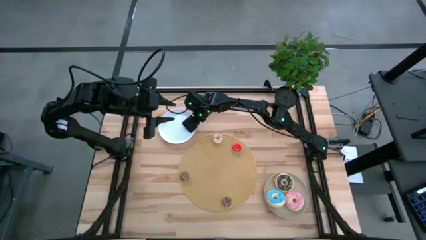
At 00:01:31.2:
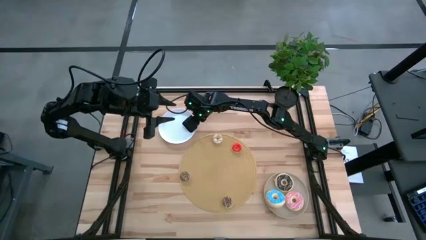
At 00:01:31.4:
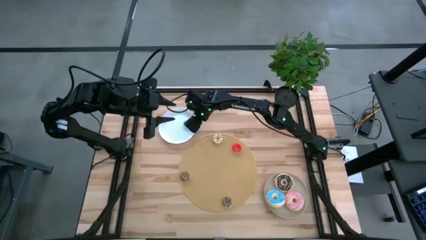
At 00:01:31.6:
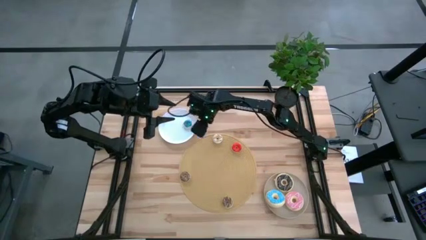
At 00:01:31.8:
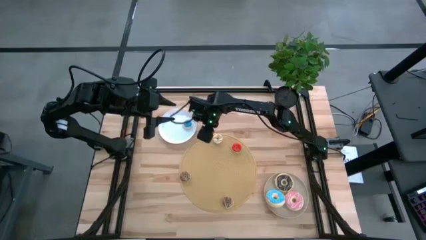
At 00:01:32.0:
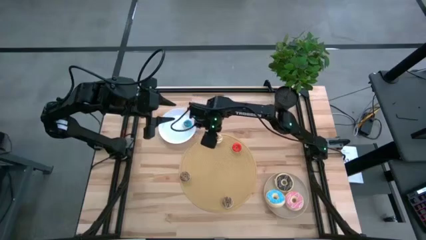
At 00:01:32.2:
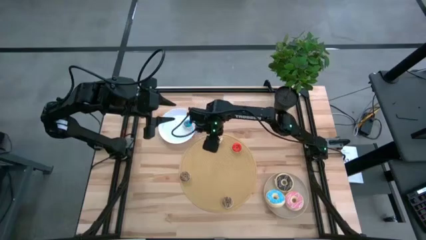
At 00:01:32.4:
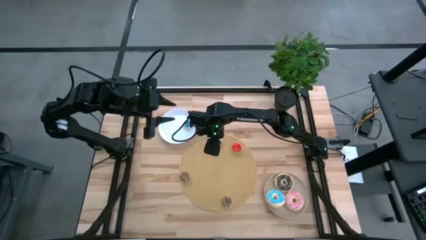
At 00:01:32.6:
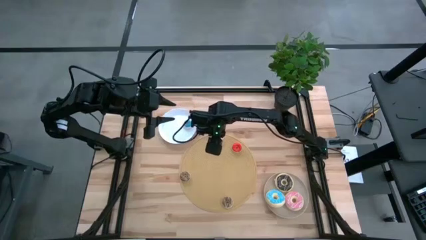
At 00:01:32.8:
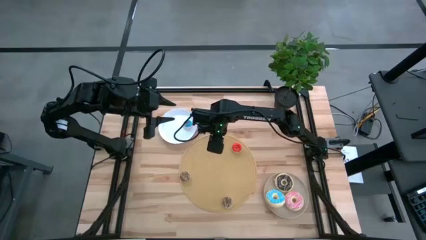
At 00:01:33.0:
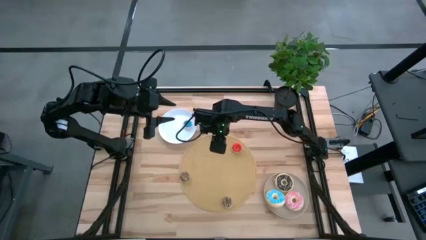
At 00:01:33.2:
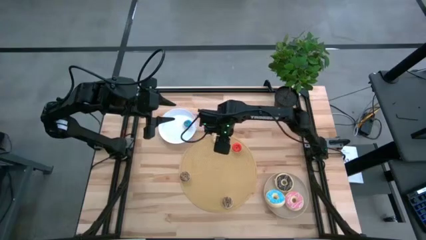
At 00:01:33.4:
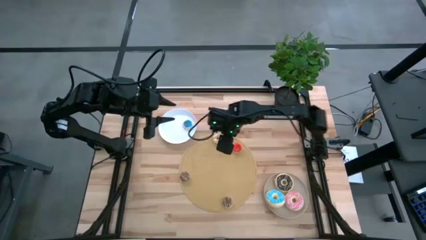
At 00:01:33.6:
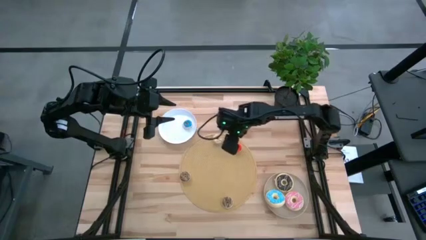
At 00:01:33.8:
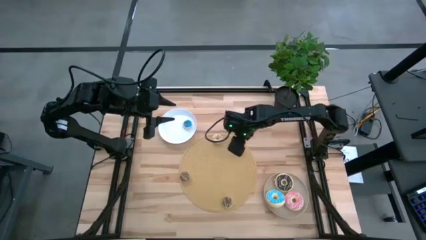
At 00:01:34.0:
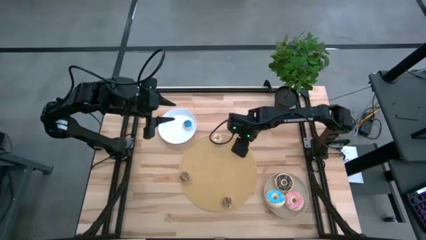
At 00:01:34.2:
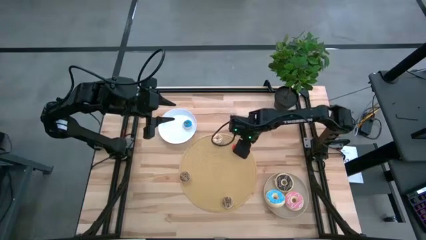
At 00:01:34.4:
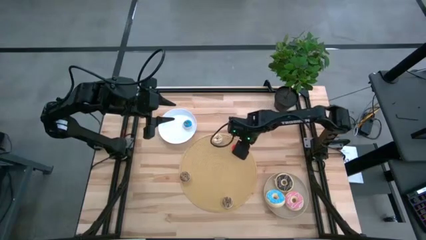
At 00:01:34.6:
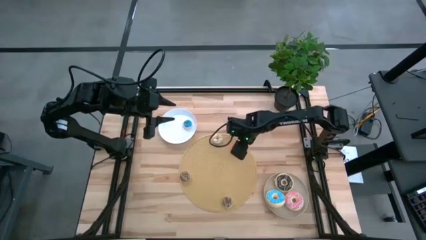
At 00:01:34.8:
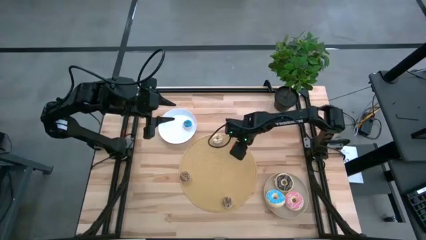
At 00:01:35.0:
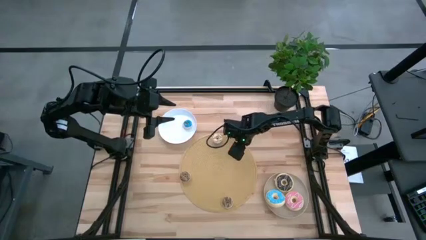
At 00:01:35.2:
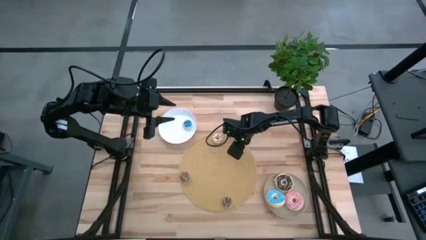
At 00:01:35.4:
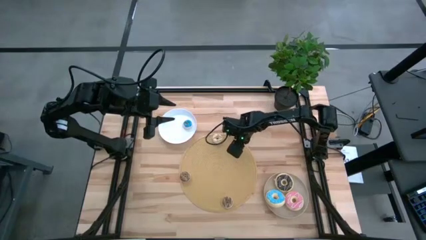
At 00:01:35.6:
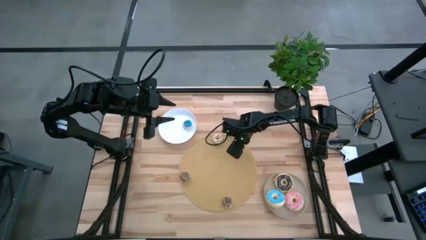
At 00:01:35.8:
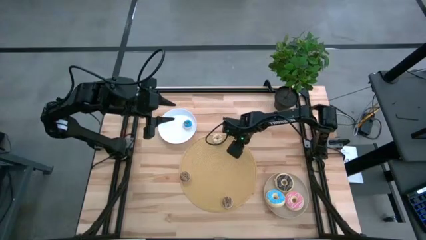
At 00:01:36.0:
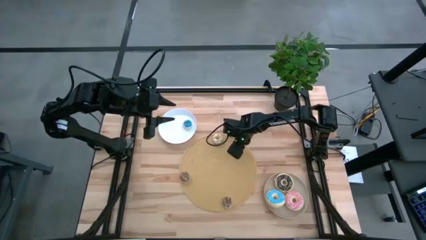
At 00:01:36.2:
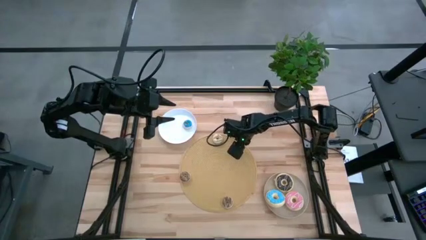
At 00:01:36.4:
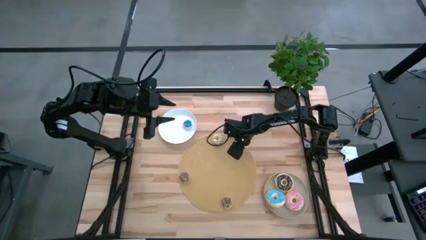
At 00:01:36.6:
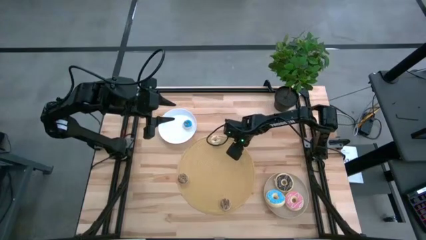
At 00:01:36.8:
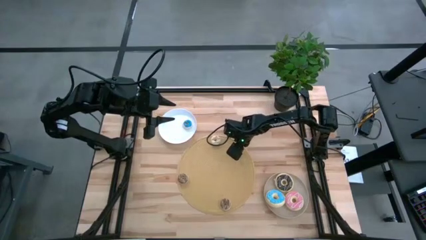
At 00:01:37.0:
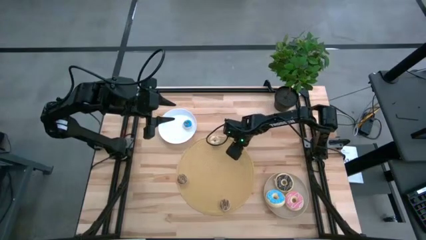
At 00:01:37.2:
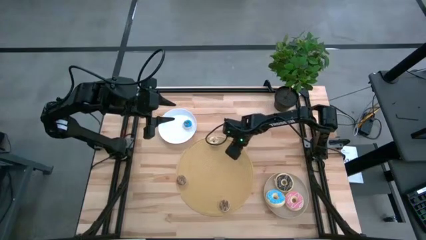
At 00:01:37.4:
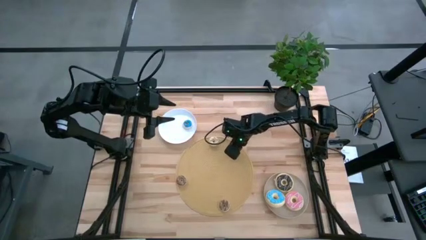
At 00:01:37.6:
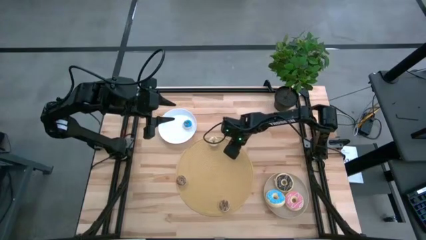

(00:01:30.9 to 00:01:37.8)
Task: Pick & Place donuts
Put the small red donut into the white plate

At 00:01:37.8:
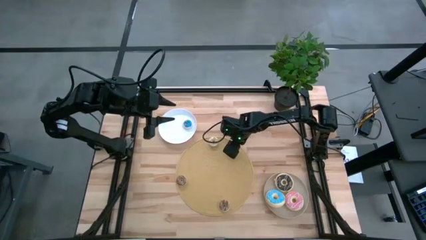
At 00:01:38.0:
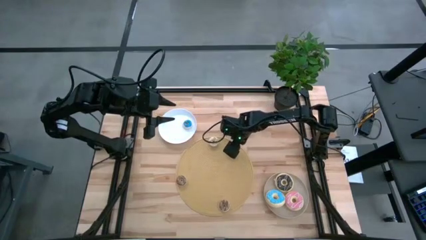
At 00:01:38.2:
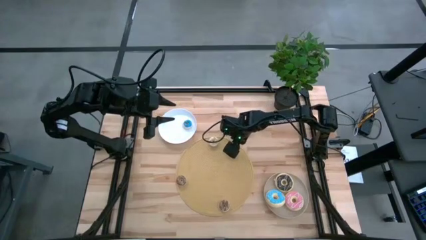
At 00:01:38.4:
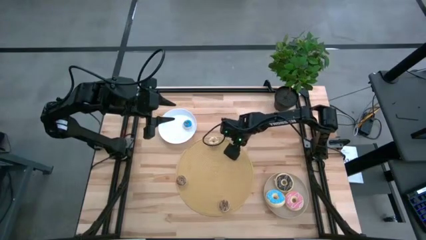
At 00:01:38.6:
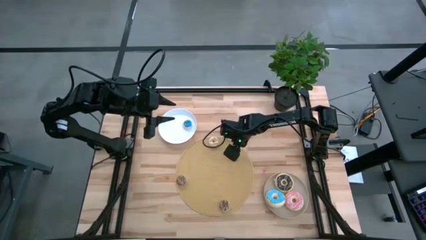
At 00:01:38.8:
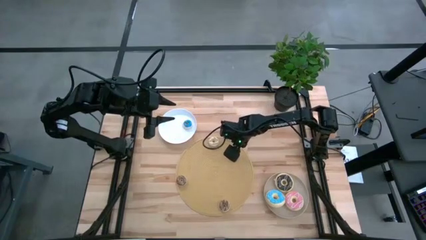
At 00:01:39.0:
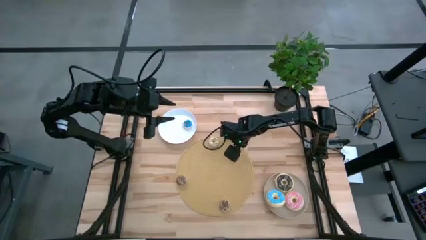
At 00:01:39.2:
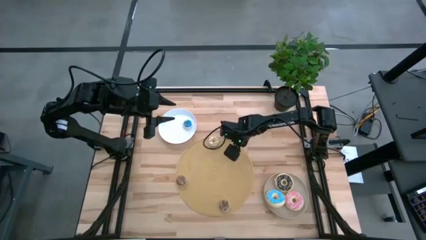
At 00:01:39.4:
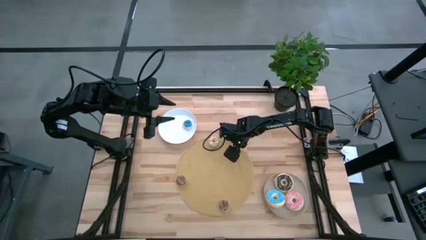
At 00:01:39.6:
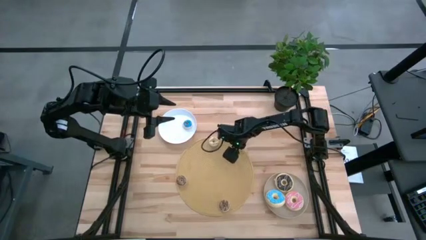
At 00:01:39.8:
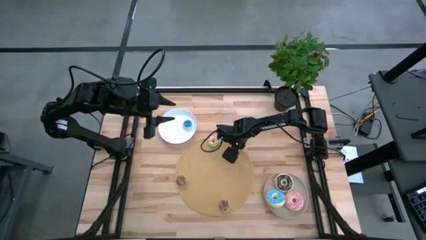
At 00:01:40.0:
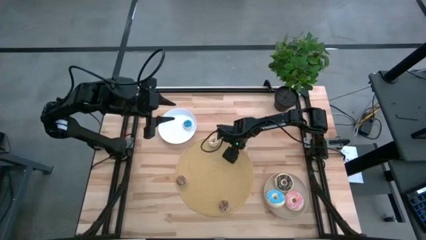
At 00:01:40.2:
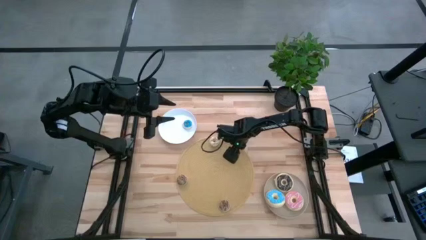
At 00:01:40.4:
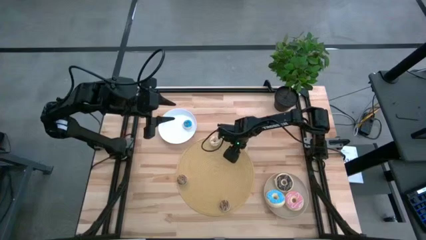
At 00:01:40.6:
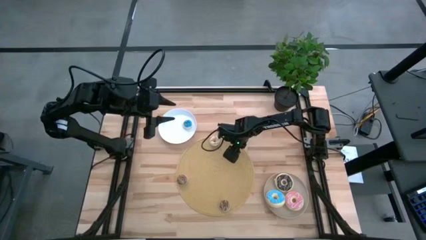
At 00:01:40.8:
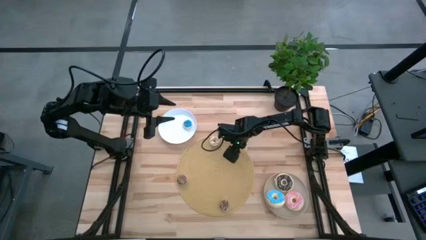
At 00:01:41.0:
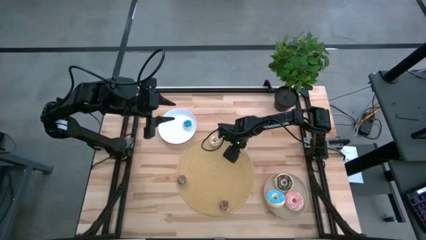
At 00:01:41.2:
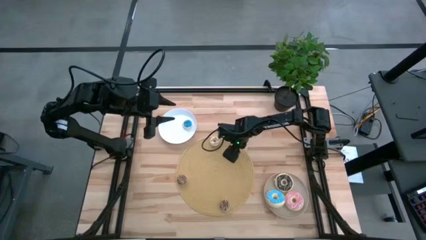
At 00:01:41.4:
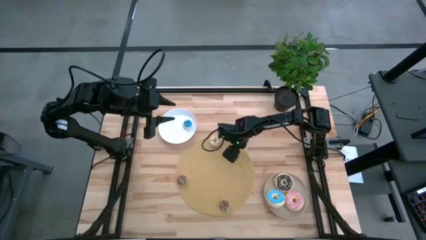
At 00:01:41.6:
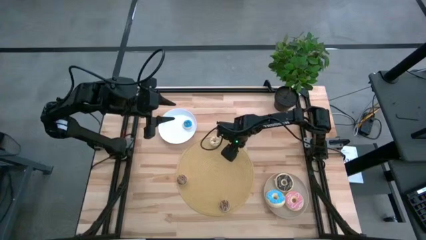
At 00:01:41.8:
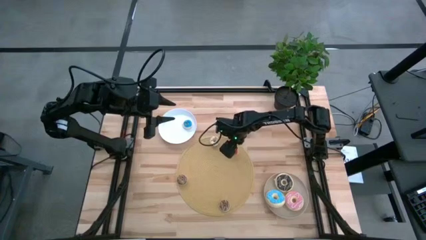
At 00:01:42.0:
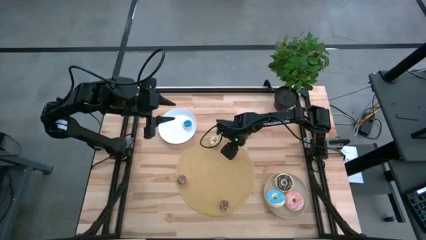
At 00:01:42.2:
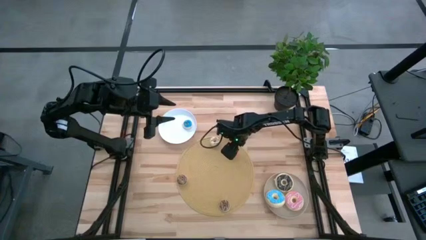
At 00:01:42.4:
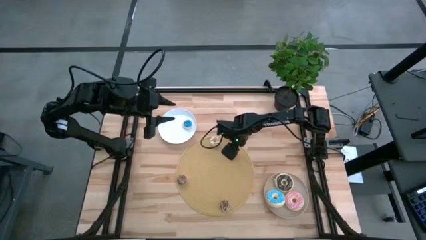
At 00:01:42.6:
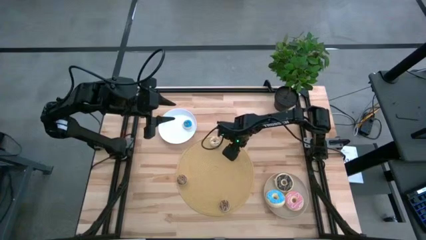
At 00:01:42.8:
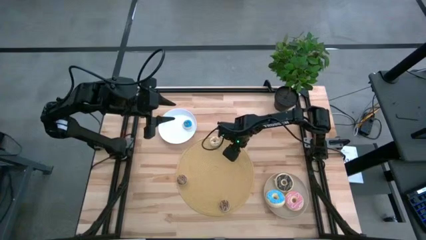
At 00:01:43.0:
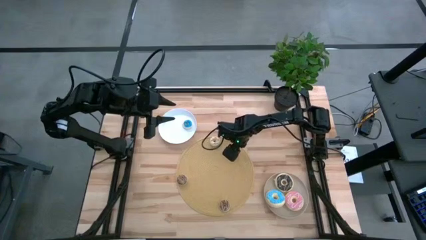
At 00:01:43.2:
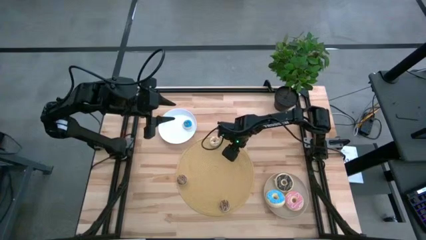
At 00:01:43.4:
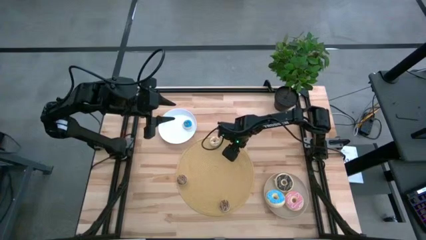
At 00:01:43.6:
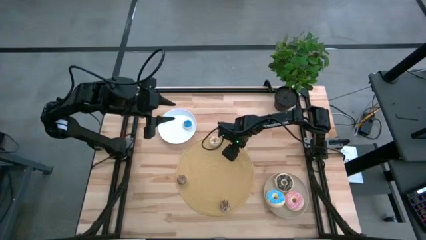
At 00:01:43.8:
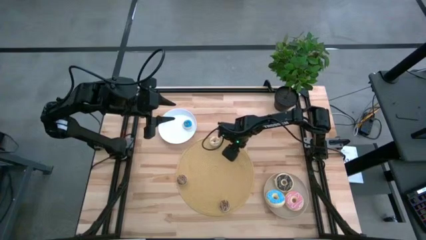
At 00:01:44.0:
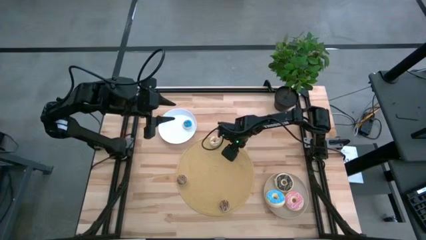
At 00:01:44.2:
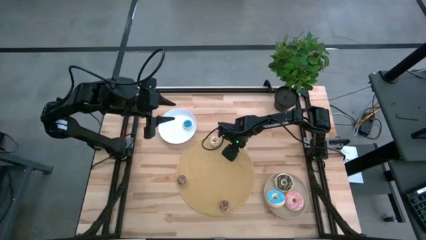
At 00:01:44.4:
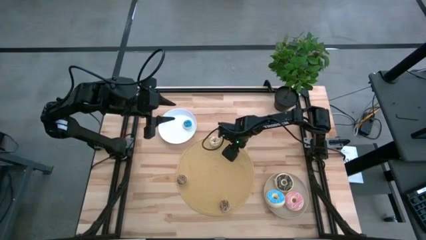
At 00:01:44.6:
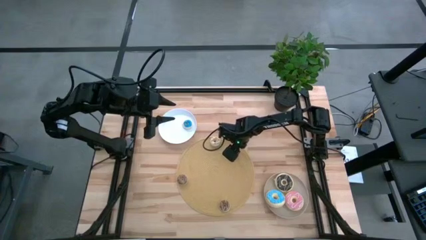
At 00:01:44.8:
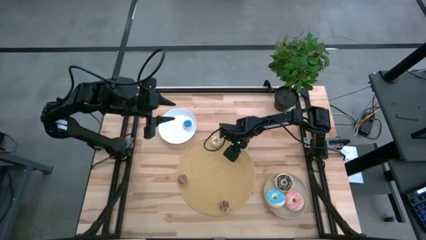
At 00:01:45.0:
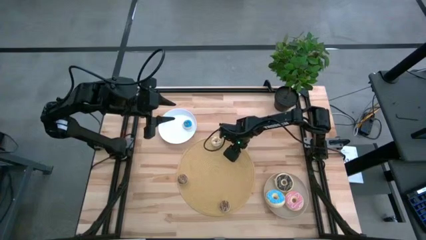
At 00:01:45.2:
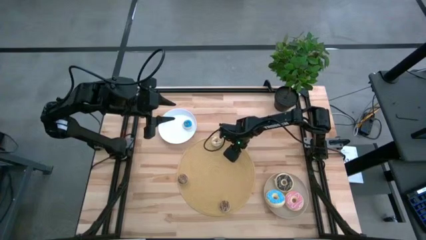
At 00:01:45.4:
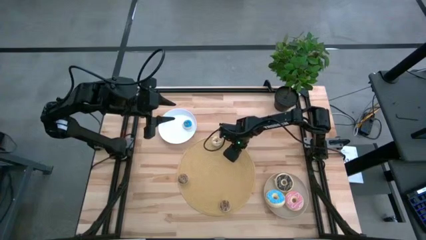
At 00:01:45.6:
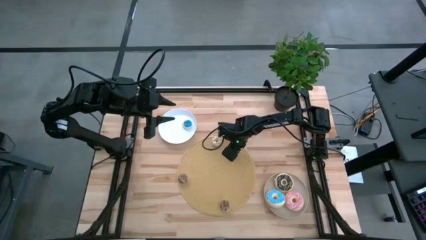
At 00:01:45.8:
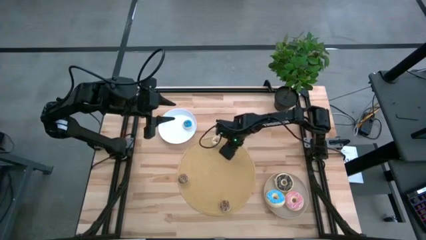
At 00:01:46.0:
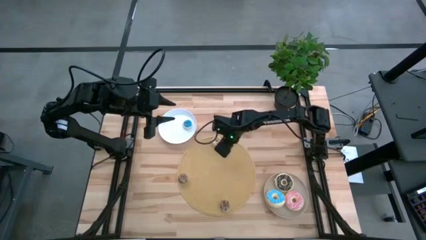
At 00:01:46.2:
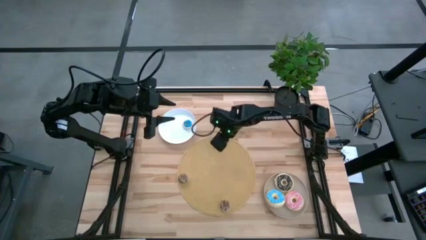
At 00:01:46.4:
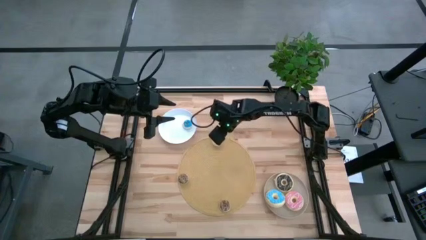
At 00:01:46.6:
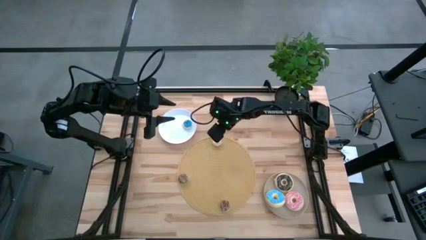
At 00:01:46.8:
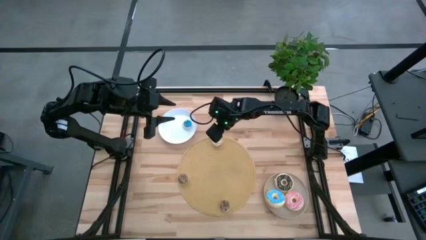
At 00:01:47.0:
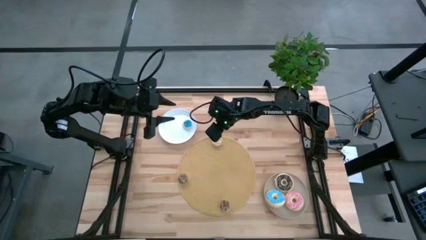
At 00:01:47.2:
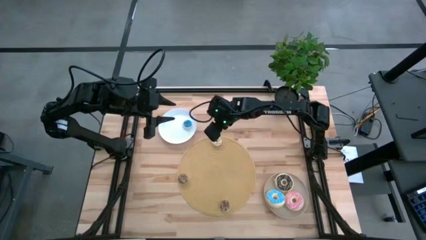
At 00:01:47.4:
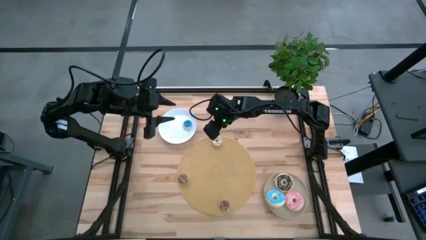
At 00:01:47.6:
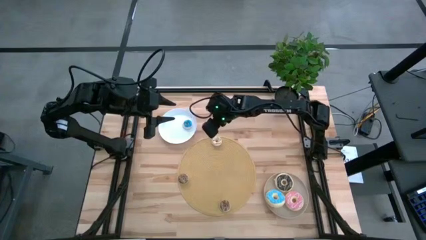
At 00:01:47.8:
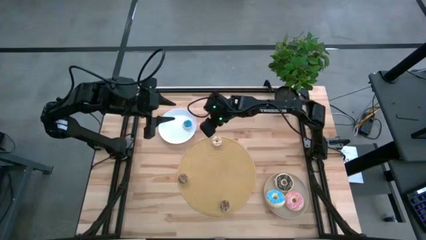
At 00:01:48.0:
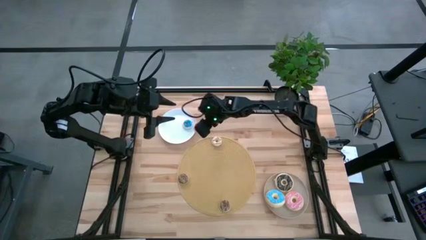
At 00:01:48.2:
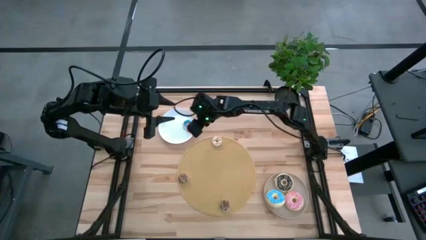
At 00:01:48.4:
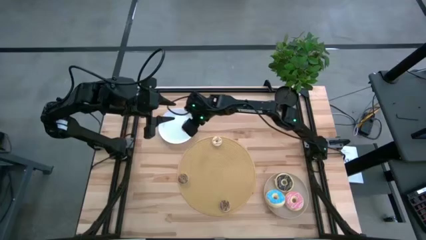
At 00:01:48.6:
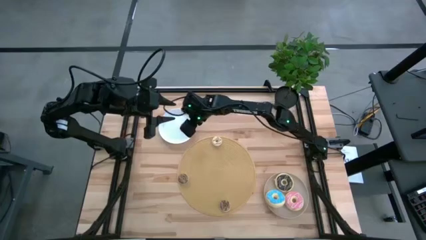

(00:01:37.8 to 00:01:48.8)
Put the small red donut into the white plate
